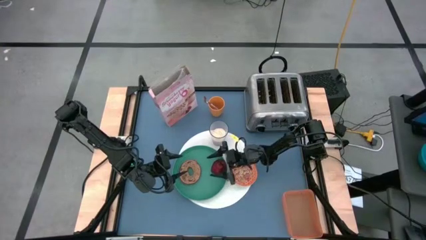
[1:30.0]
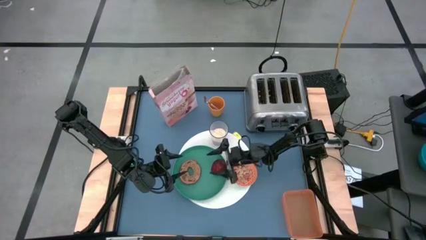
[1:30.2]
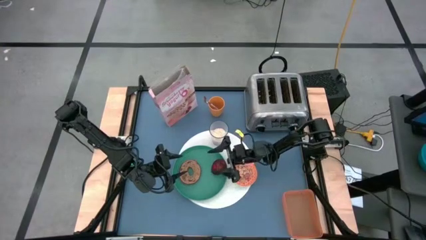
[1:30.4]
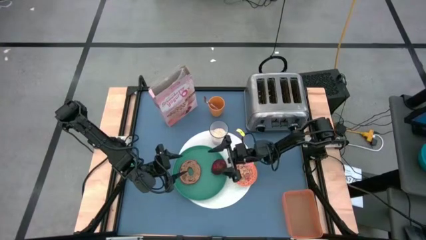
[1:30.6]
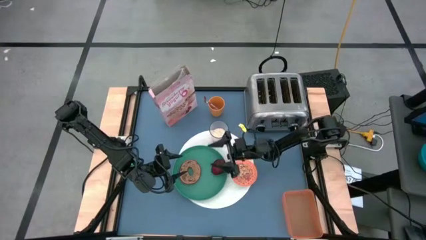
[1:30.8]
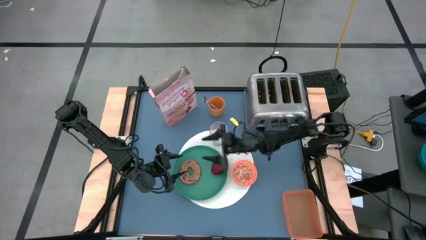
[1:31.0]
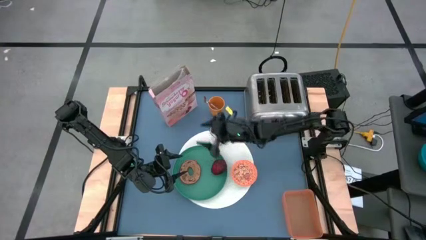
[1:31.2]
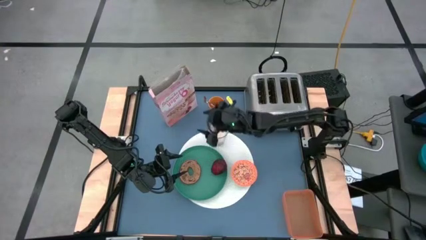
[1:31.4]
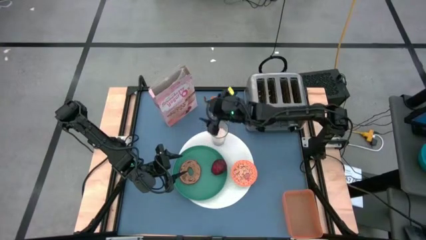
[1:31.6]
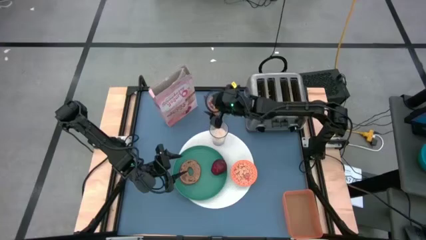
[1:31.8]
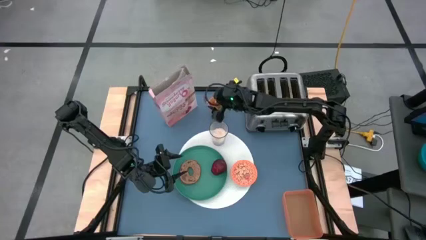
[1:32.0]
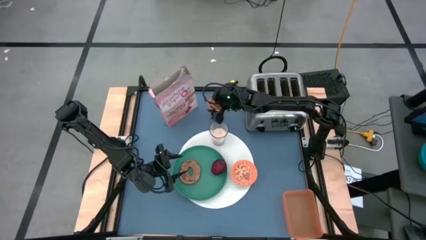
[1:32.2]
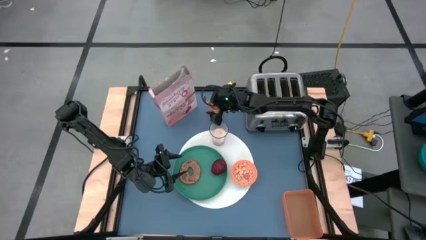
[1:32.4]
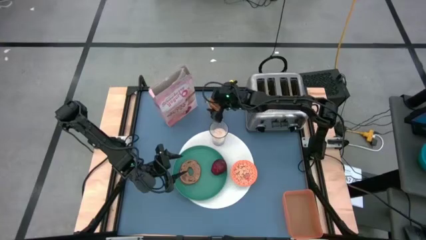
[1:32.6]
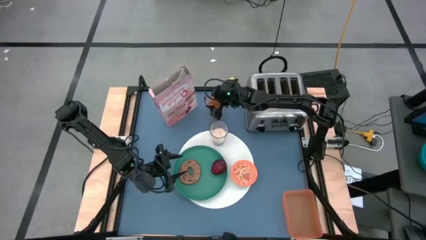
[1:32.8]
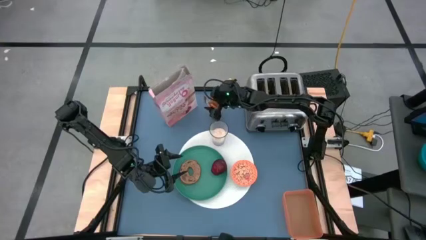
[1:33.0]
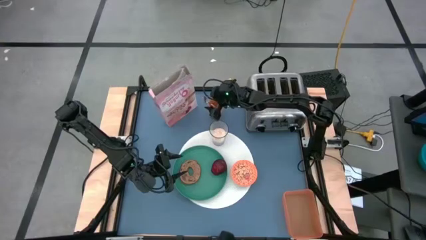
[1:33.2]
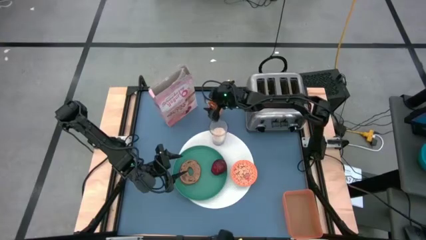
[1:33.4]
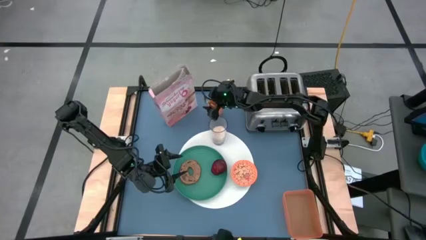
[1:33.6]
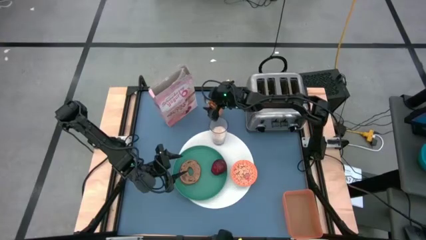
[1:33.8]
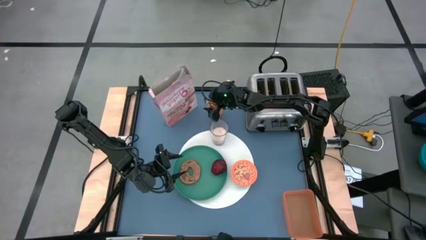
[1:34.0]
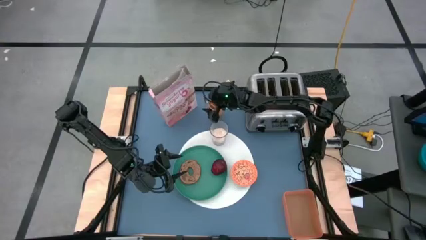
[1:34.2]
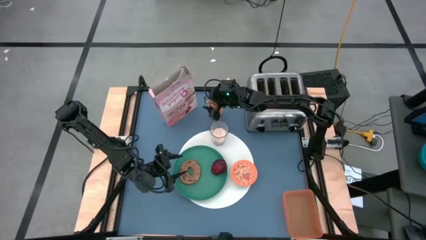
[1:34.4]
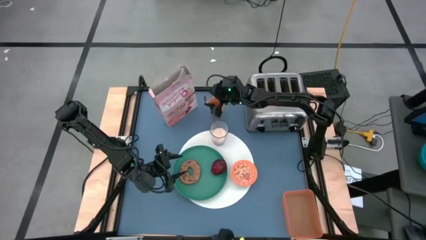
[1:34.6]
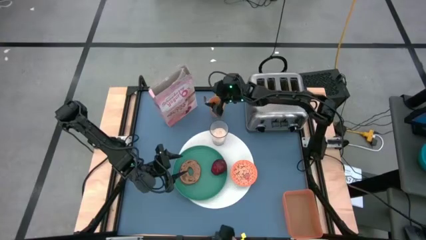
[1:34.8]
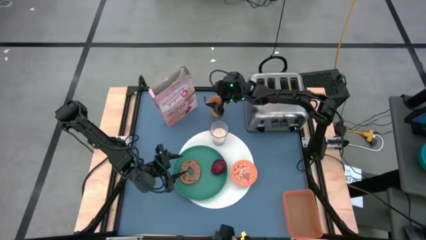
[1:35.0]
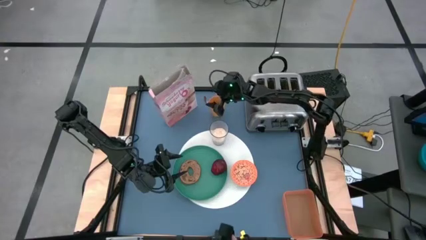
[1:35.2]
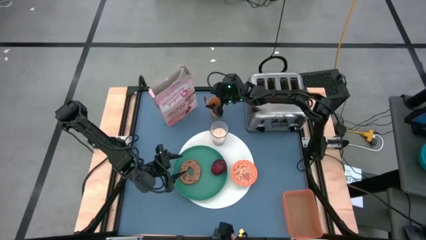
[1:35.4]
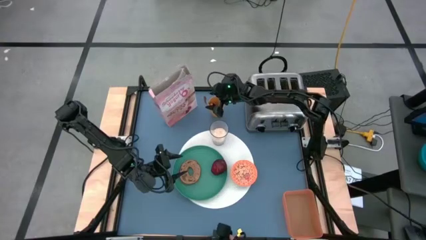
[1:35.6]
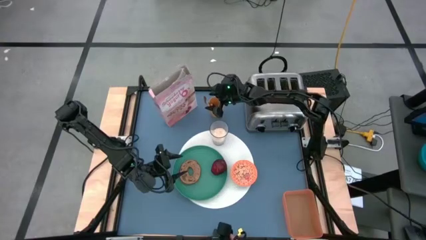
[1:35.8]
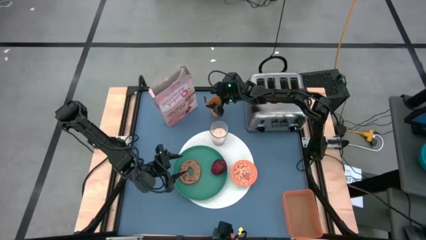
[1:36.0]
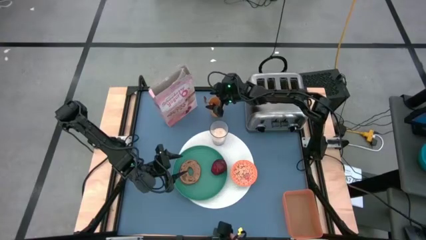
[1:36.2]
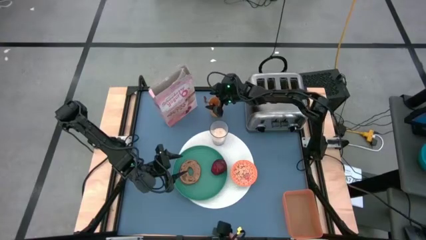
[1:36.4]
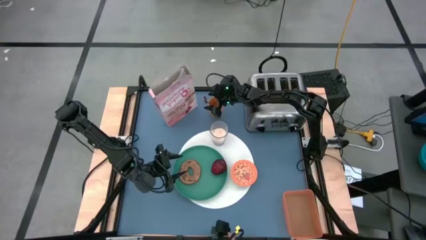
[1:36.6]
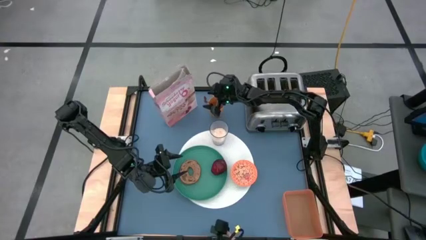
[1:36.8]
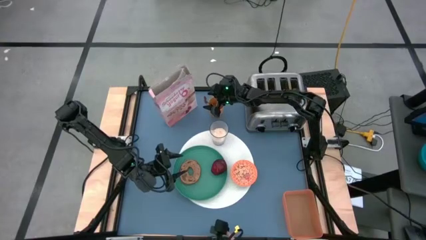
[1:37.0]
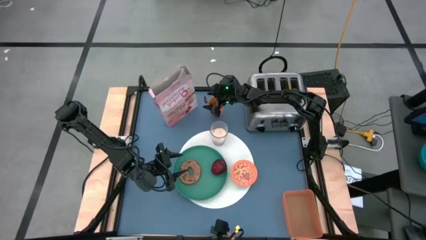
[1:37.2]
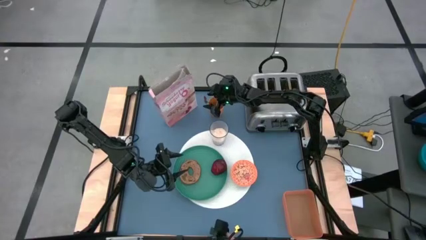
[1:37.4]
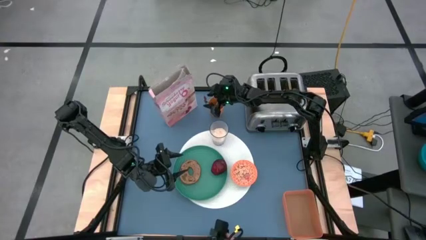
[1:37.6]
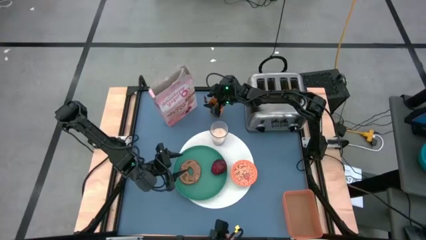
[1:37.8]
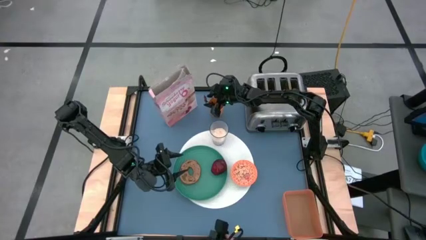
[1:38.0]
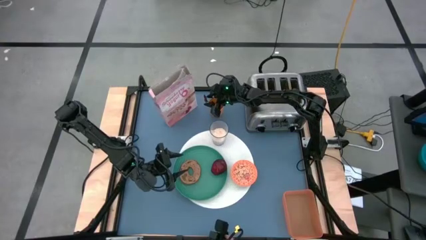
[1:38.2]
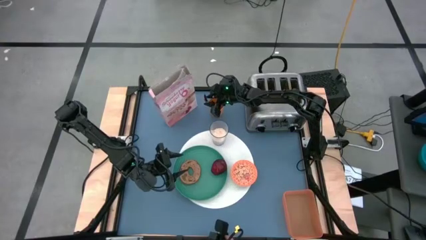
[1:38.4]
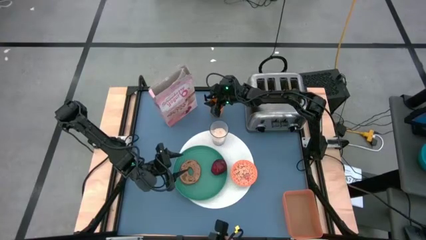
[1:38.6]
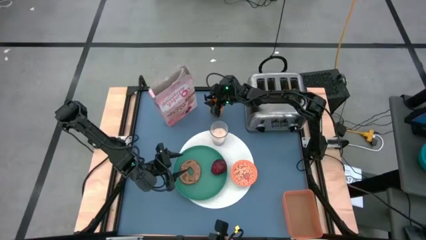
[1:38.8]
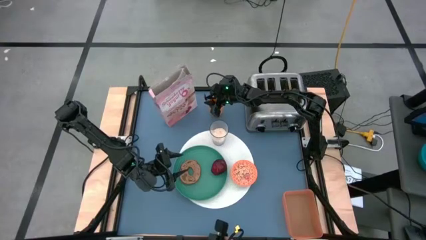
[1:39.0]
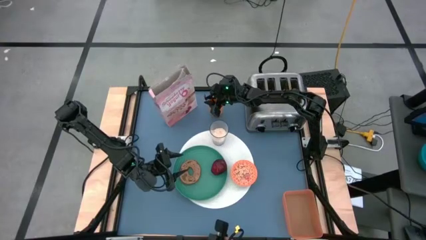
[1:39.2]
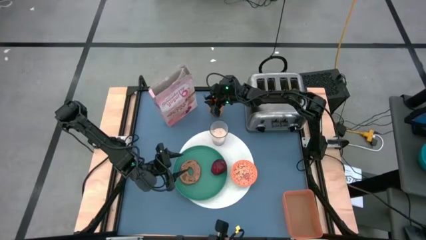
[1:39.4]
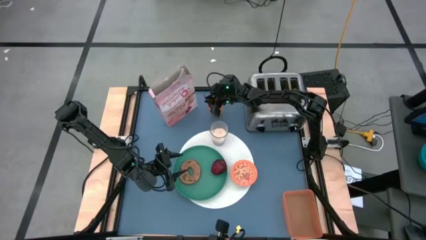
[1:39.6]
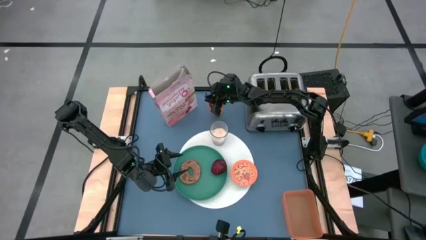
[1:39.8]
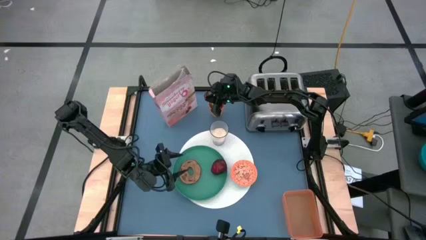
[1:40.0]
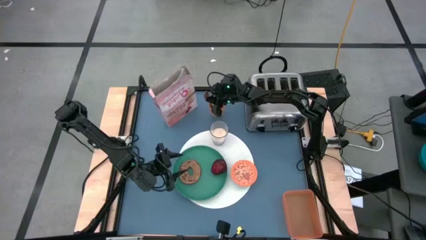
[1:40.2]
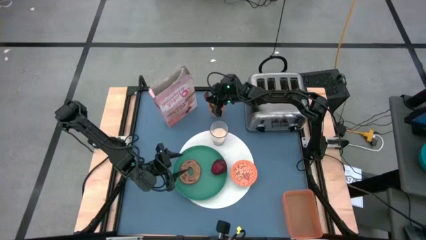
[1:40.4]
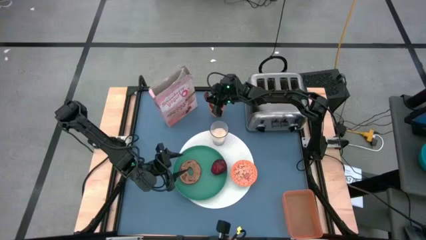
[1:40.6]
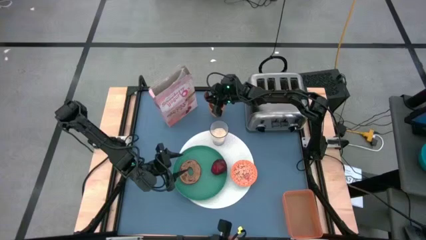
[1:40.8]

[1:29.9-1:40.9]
Task: Arrange a breakfast setting
Put the spoon beside the orange bowl

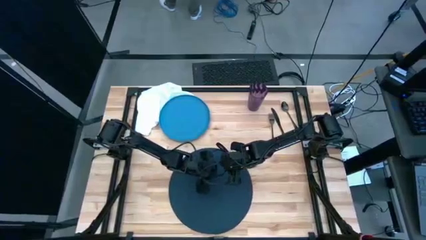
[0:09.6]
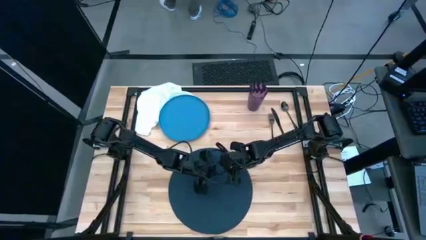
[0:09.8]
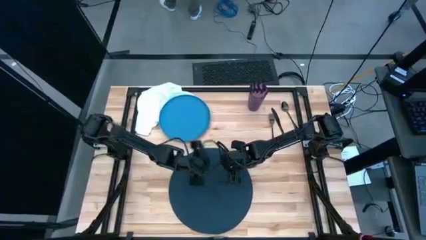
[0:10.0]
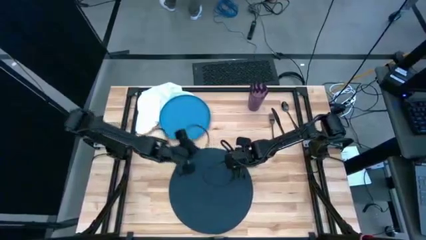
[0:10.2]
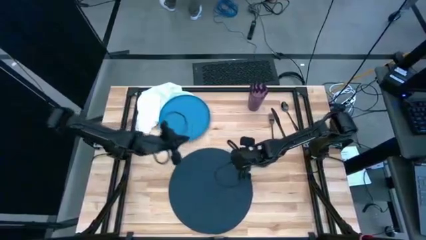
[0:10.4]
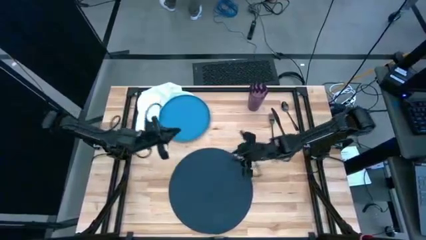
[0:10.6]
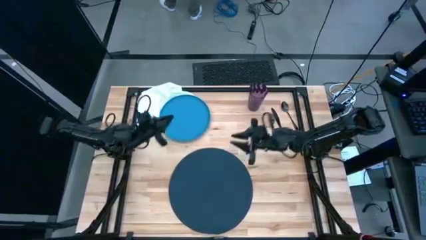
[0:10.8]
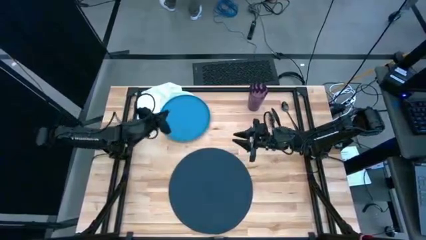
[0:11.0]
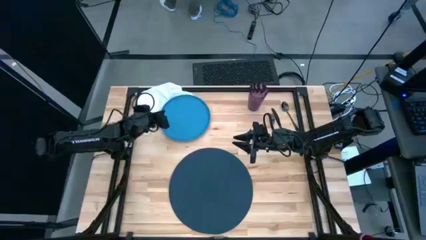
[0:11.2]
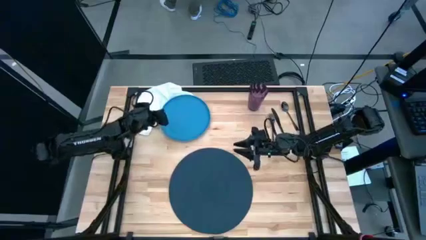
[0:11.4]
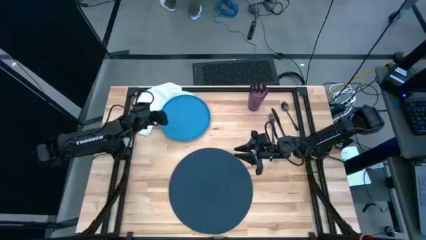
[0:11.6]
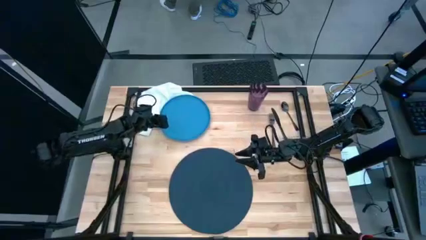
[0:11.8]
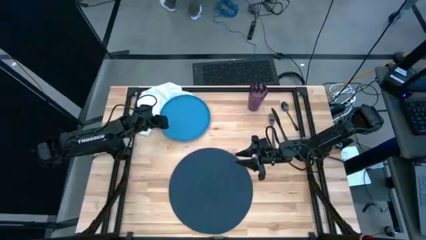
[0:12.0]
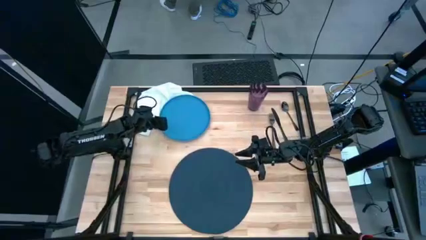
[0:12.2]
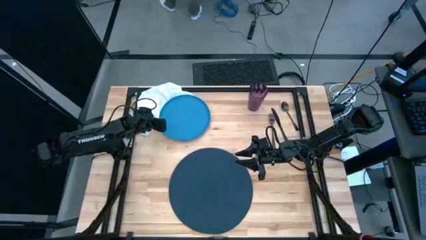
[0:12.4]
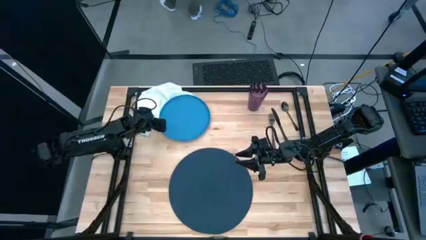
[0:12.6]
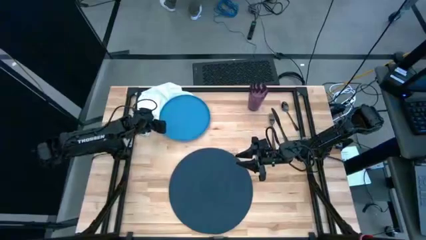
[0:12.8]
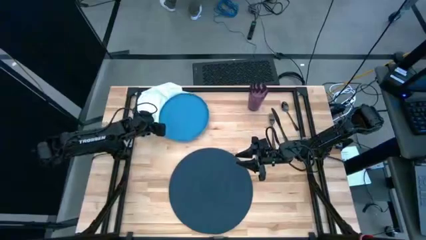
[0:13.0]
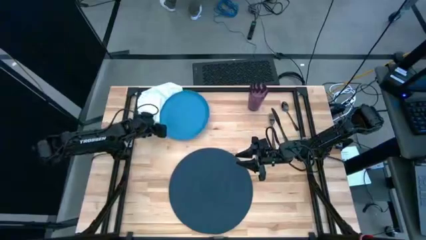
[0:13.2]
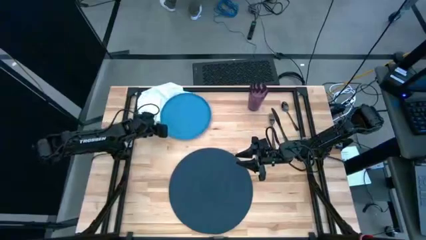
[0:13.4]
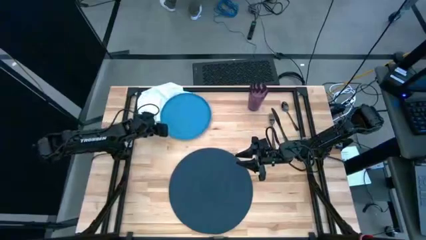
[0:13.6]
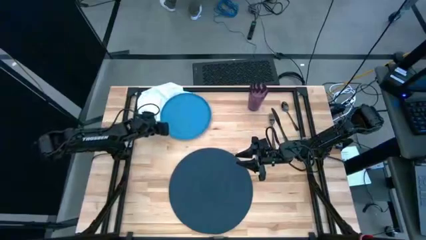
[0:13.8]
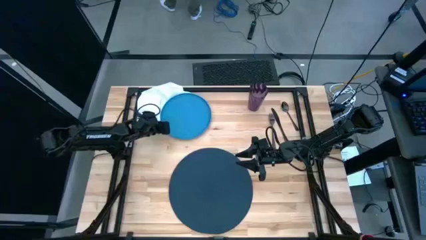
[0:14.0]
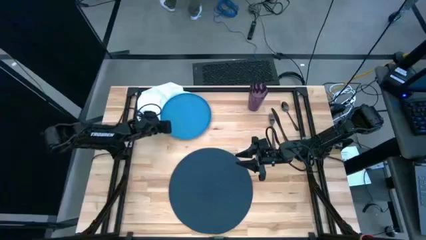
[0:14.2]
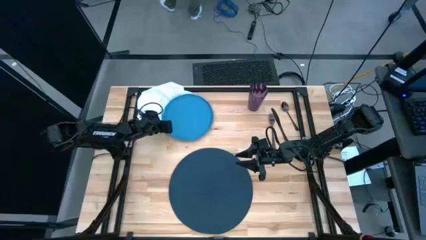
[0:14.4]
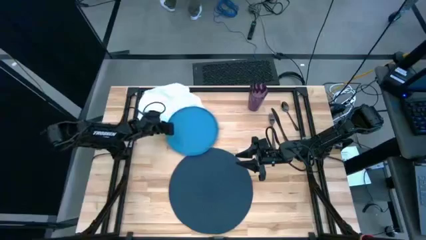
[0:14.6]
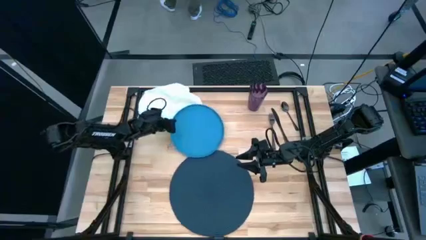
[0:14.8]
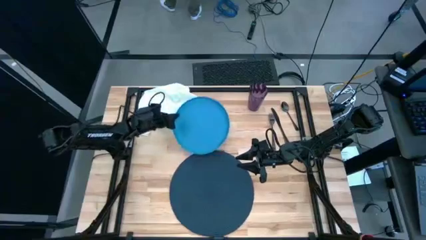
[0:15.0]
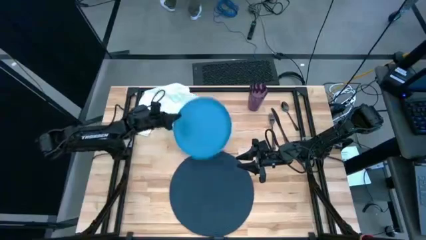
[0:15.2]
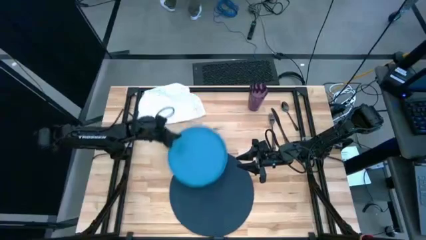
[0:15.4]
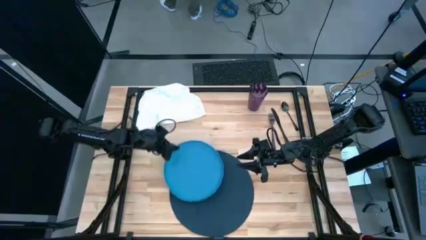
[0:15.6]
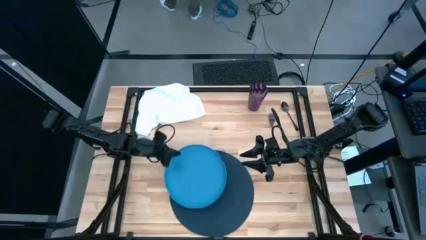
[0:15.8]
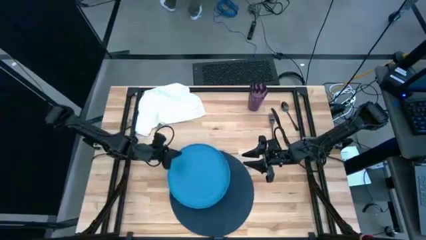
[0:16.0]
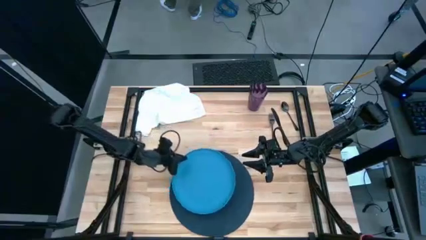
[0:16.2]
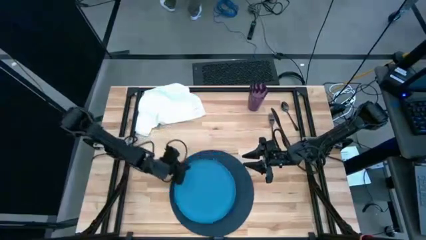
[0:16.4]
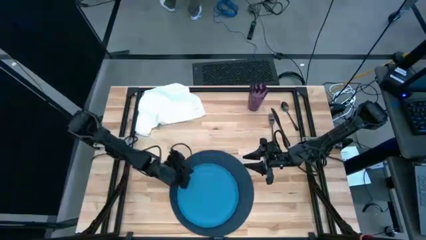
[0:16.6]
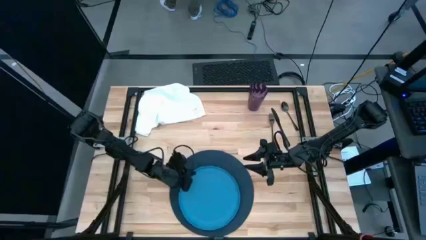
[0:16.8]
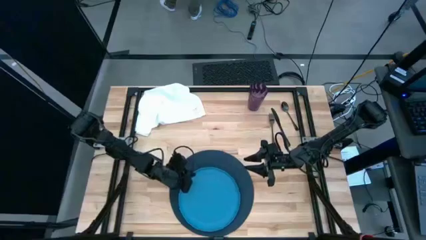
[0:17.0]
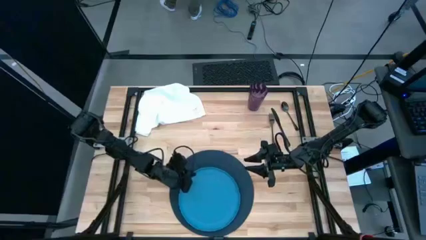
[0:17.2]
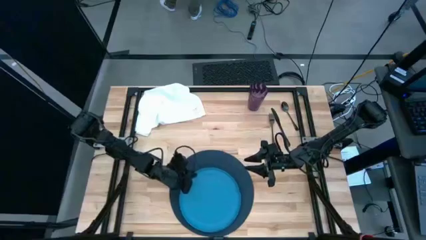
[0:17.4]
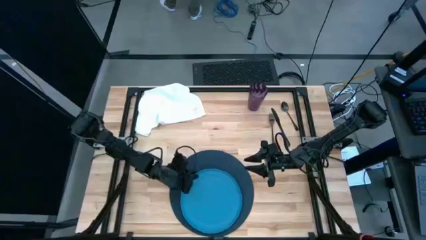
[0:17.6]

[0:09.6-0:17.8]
Task: Set table place
Put the plate on the place mat
